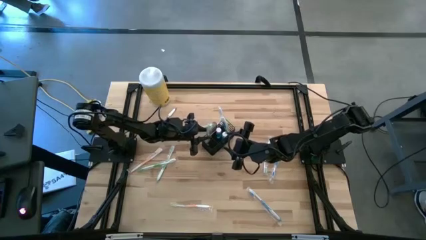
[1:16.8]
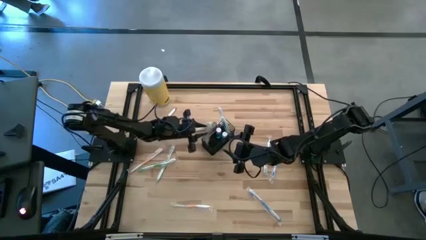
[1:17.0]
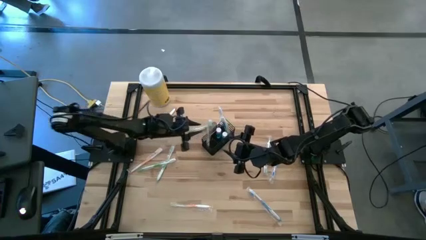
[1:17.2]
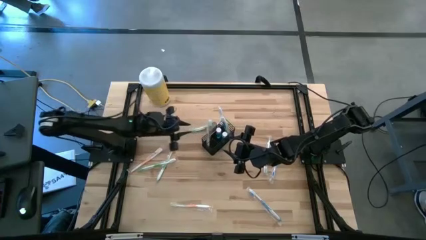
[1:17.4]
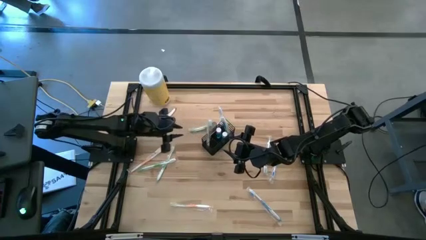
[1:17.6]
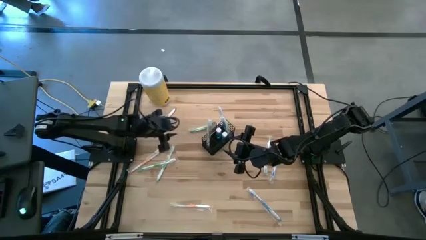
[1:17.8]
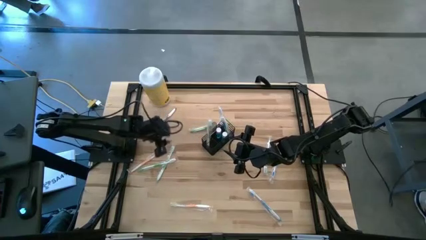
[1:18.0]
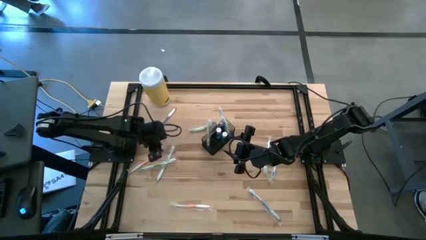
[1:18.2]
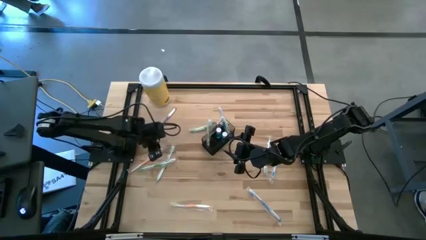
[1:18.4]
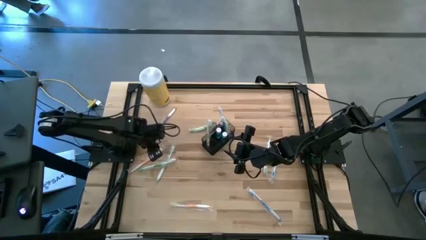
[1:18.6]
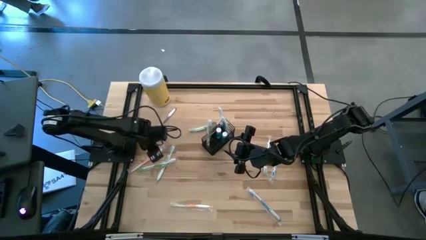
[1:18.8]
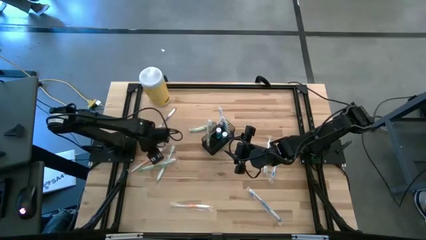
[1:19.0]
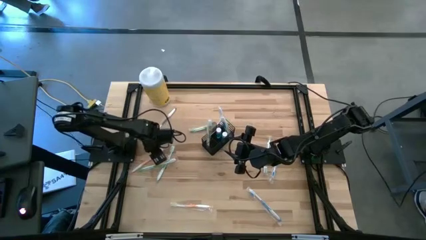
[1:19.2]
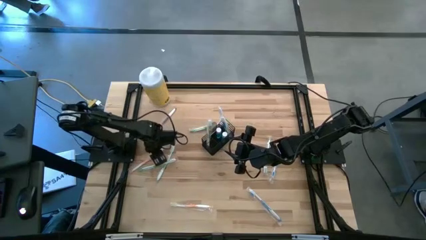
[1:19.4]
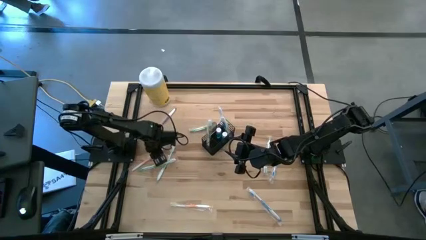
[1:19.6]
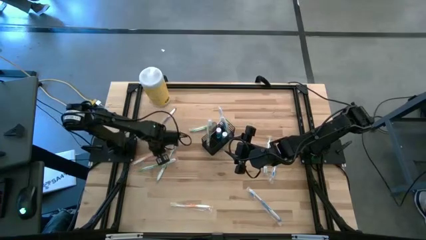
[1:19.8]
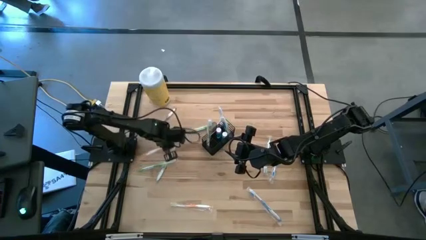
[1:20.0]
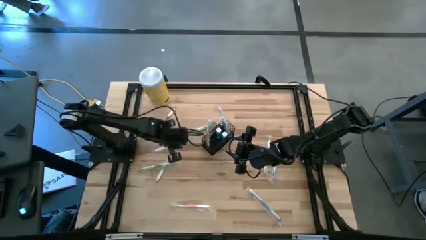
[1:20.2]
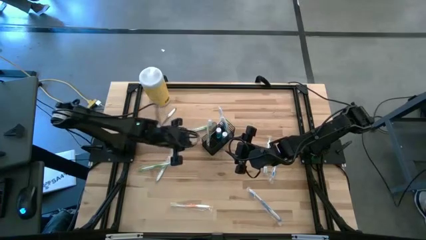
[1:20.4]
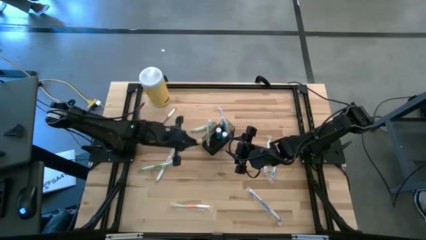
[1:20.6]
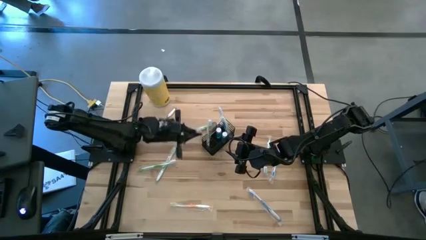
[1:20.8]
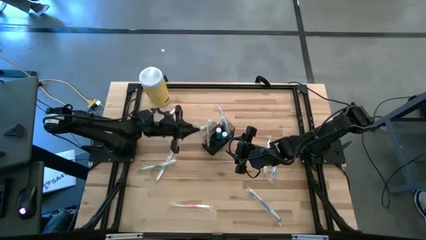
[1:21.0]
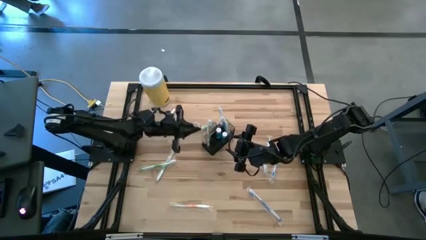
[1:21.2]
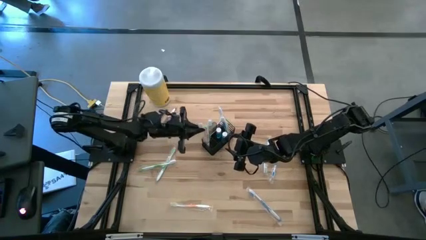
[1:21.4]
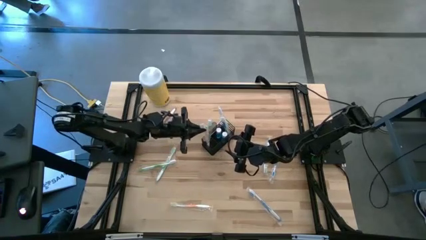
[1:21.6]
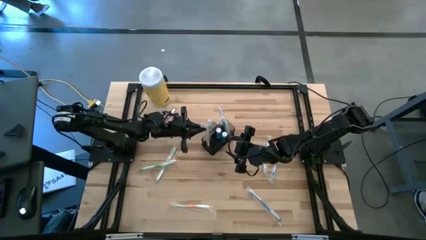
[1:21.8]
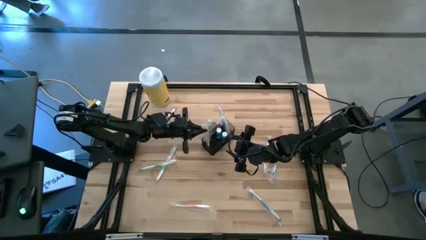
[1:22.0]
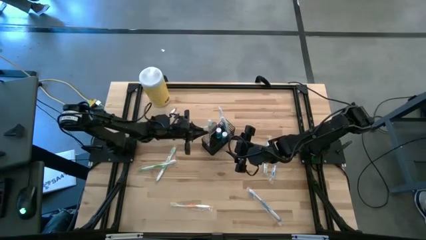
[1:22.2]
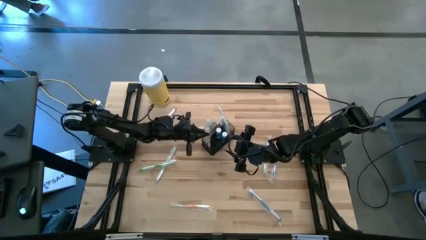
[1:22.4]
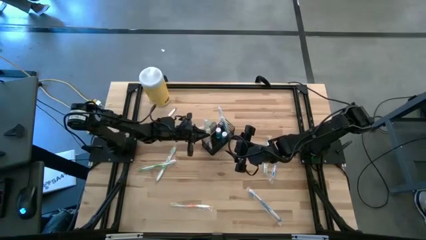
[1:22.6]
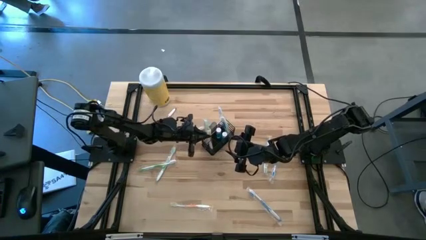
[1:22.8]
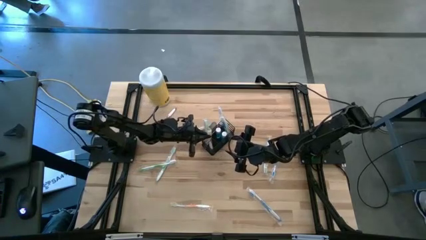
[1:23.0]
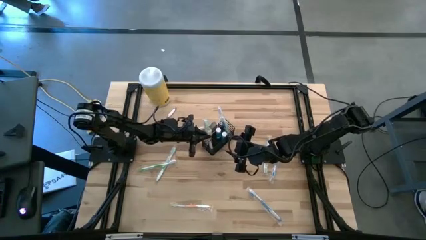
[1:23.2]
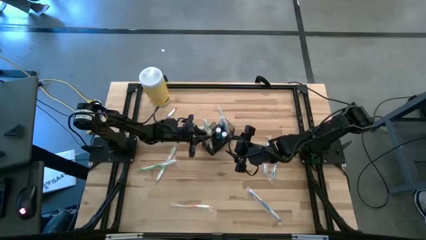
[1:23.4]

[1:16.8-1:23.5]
Task: Pick & Place toothbrushing station
Put the orange toothbrush into the wire organizer

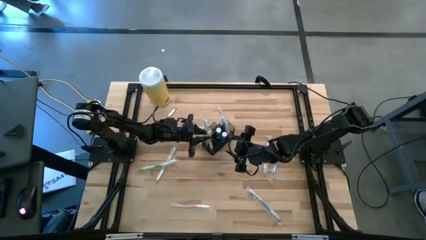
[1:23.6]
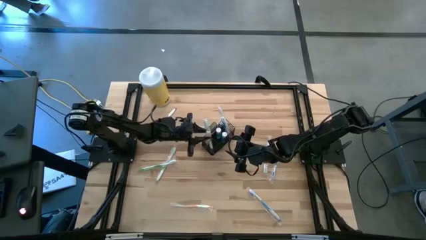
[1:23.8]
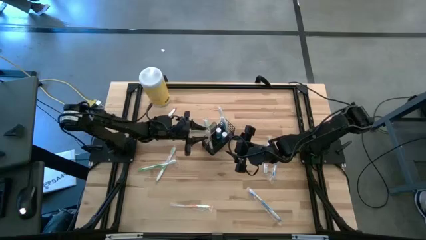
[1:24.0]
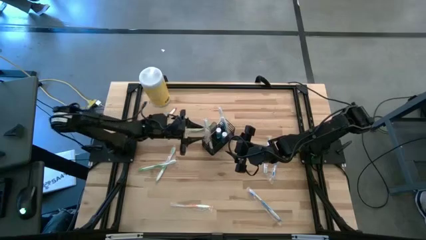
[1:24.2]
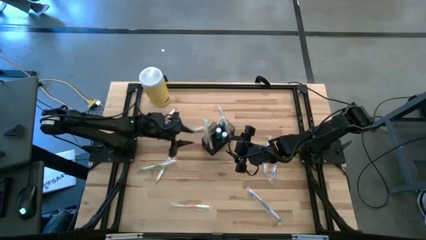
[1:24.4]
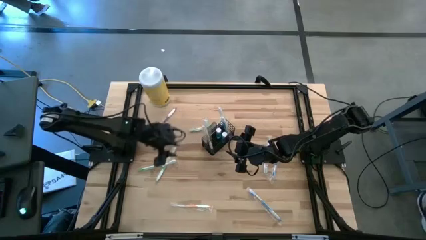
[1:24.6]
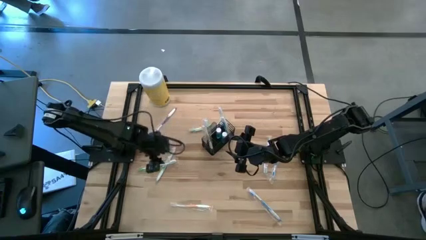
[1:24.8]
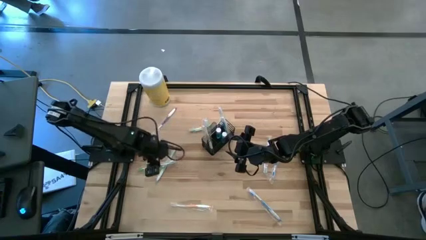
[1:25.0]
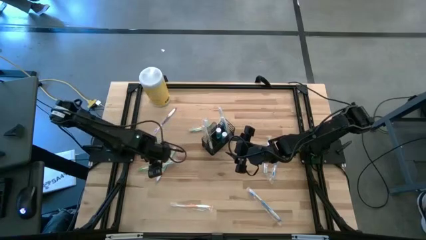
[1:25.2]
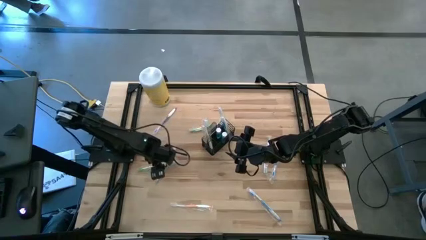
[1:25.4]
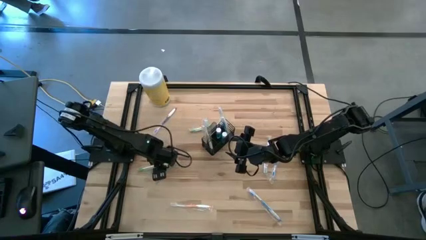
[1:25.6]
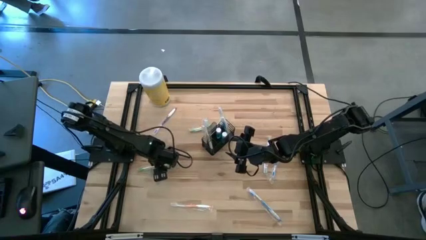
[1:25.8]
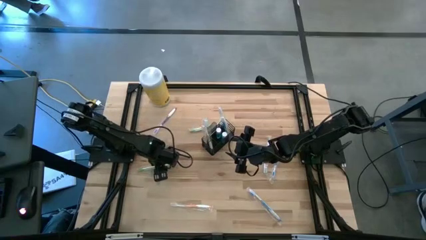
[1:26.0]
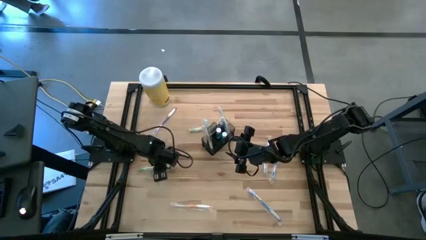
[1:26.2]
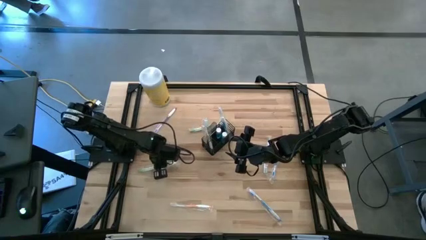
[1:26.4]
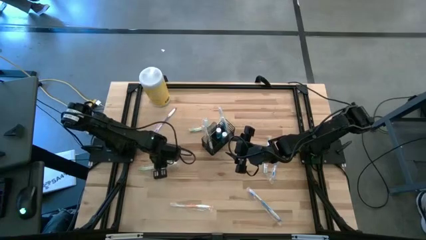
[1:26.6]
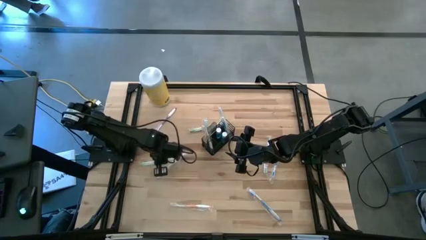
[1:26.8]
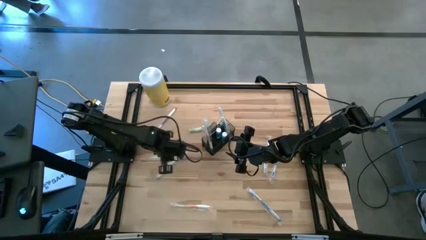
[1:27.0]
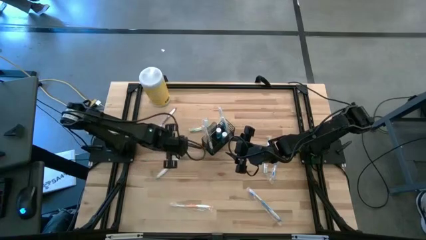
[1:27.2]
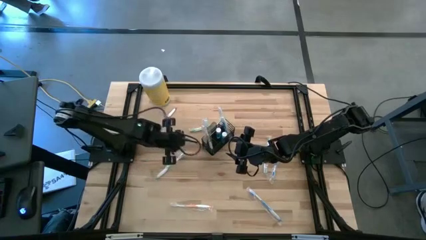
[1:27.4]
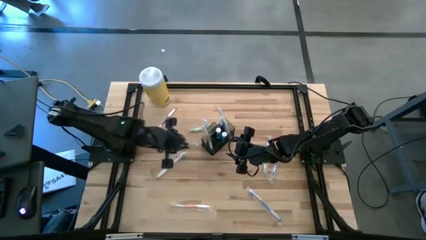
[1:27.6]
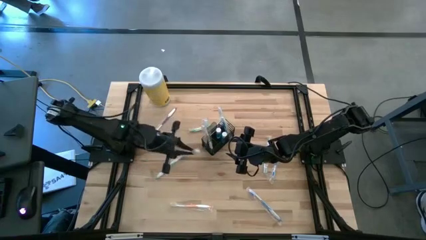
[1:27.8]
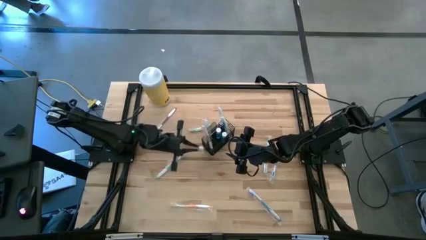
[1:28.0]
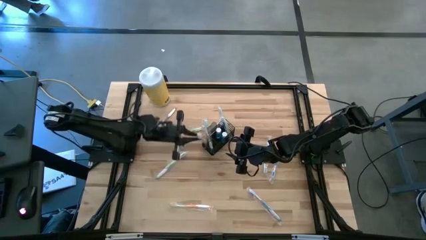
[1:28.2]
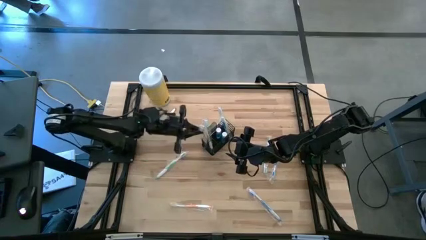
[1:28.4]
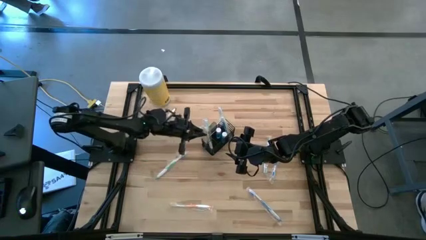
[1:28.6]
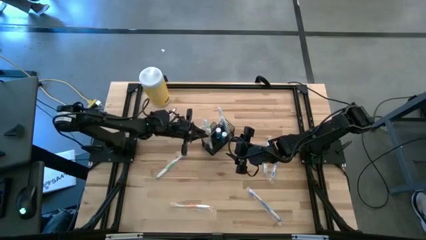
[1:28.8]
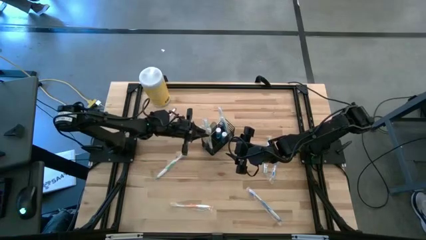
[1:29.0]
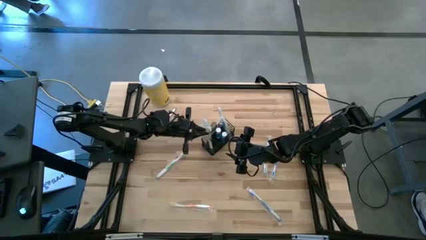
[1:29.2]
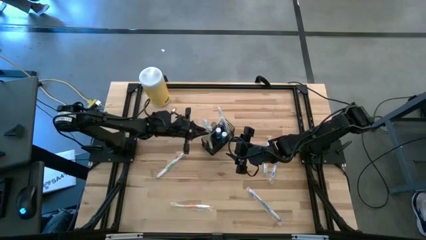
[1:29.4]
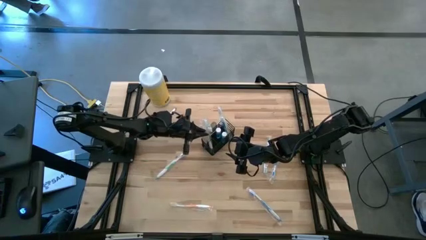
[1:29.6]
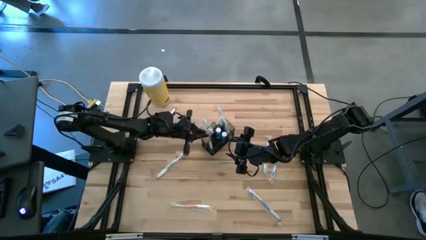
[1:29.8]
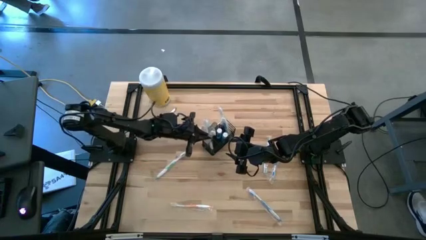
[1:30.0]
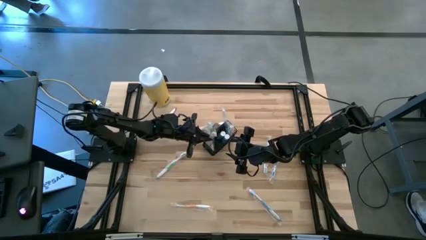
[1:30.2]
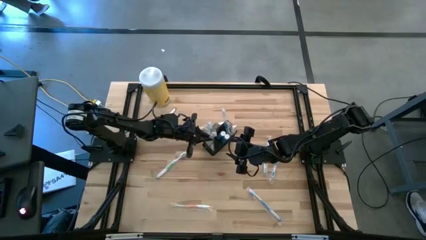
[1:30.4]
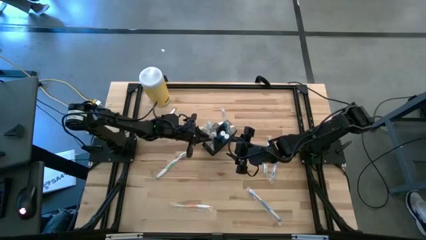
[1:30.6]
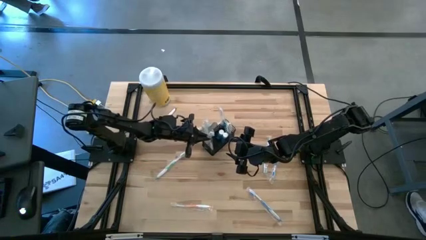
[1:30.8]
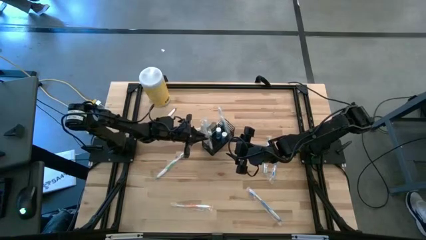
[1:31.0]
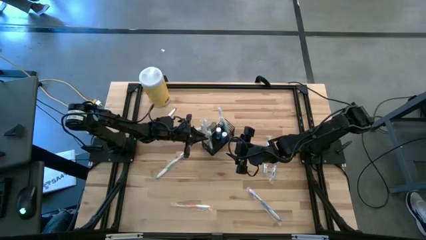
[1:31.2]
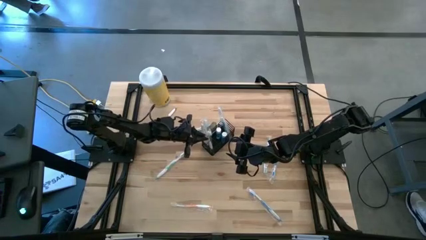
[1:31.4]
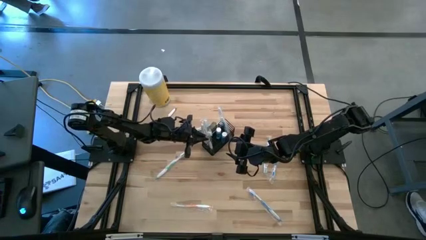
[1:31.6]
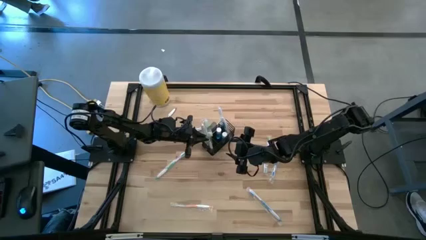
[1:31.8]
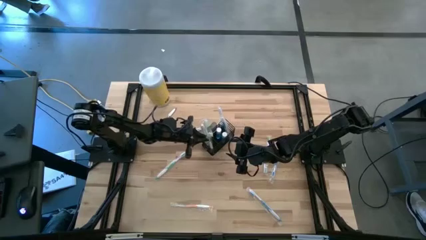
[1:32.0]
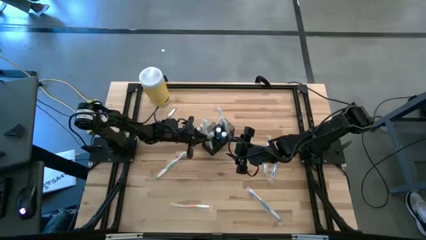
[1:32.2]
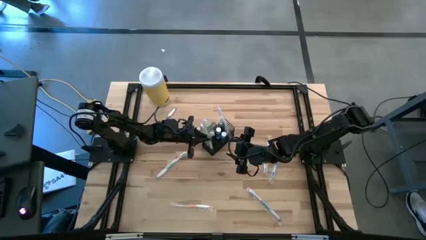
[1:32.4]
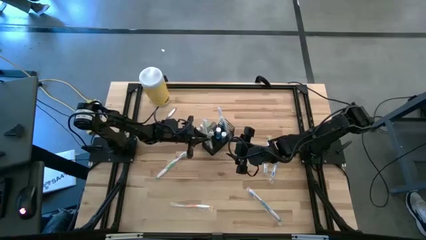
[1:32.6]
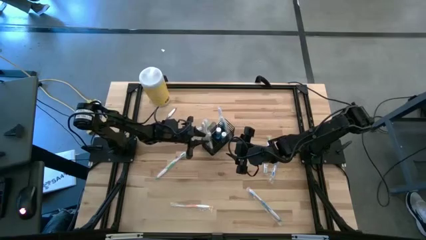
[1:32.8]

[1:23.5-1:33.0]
Put the green toothbrush into the wire organizer

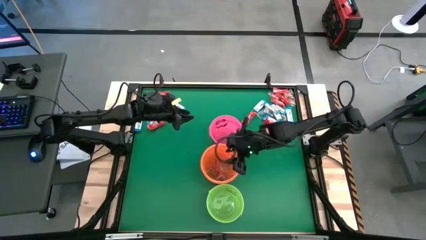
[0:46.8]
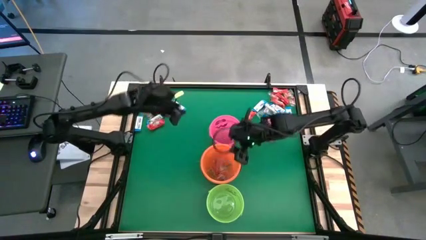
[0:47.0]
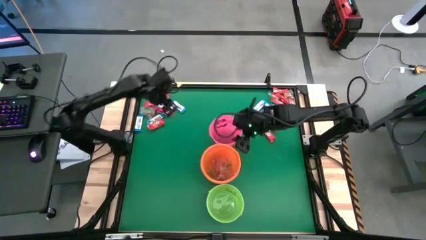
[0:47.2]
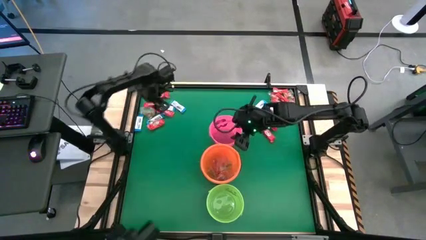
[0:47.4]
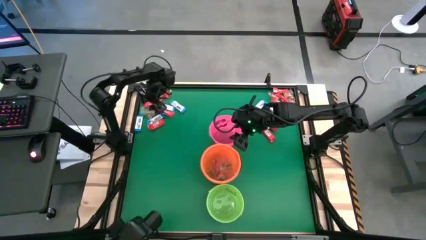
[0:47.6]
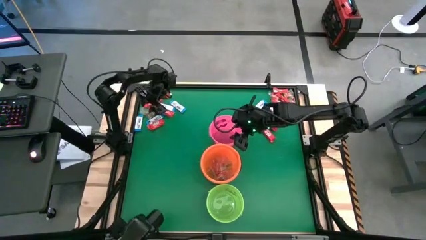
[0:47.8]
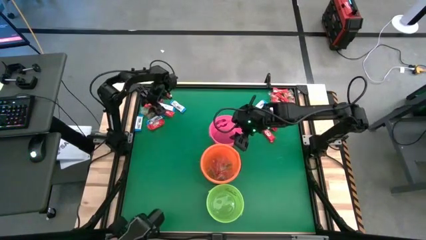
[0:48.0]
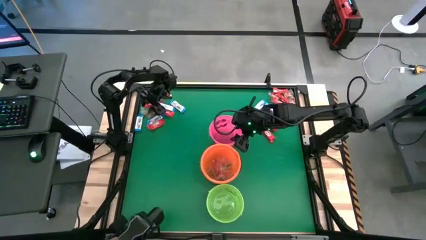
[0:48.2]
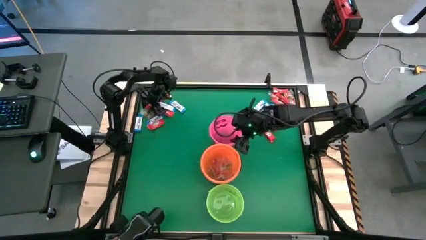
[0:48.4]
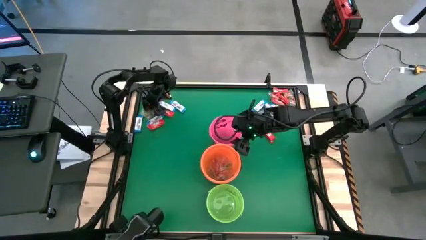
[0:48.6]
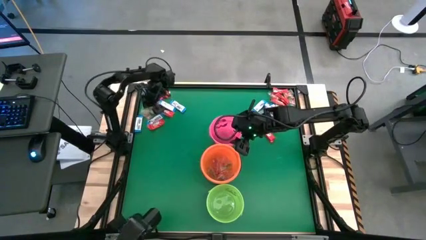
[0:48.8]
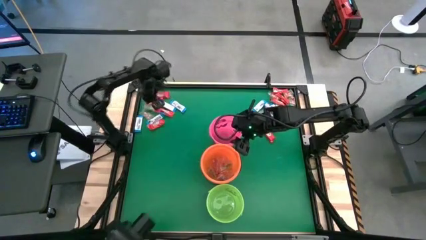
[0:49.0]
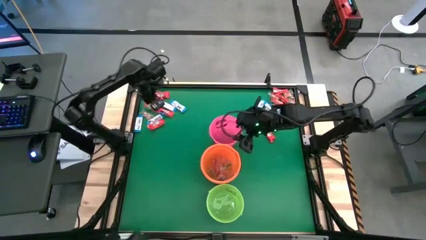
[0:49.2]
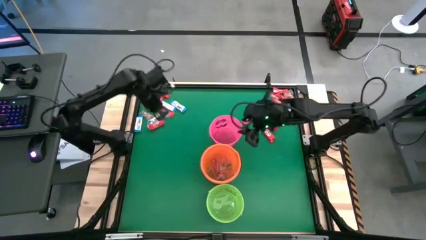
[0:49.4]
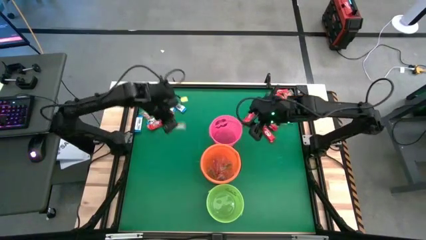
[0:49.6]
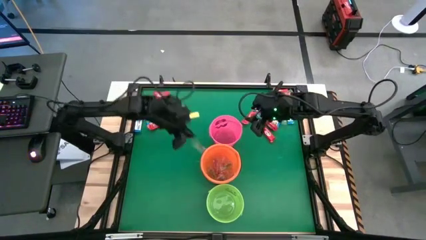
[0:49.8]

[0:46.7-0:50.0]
Task: Sort candy by brand, put in halloween buckets
Put the green gummy into the orange bucket
